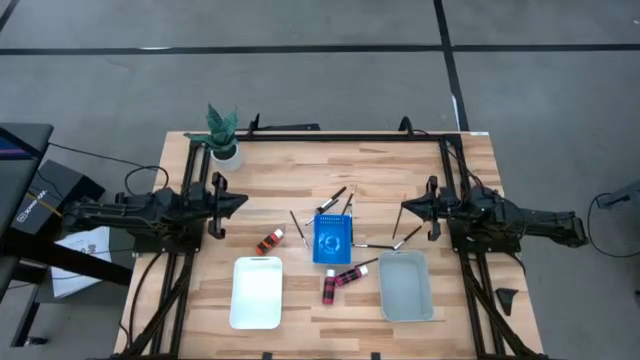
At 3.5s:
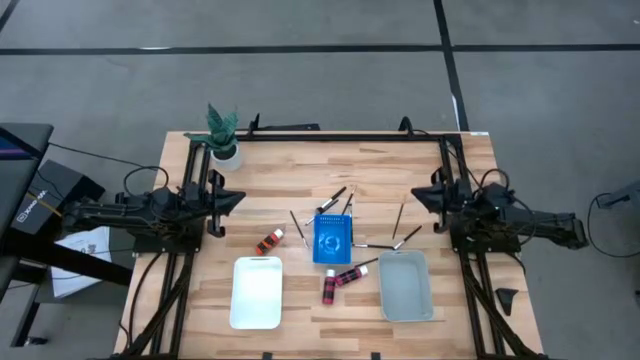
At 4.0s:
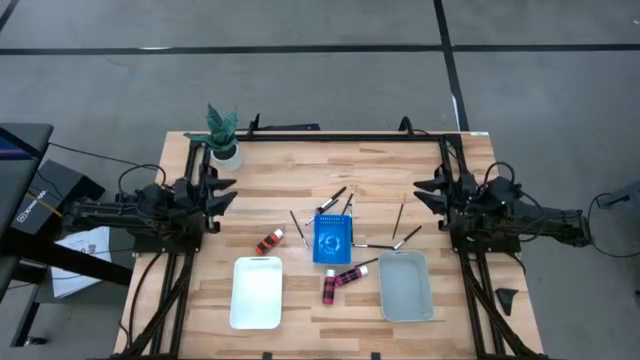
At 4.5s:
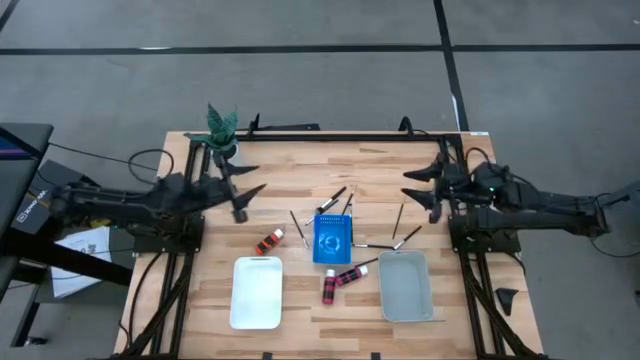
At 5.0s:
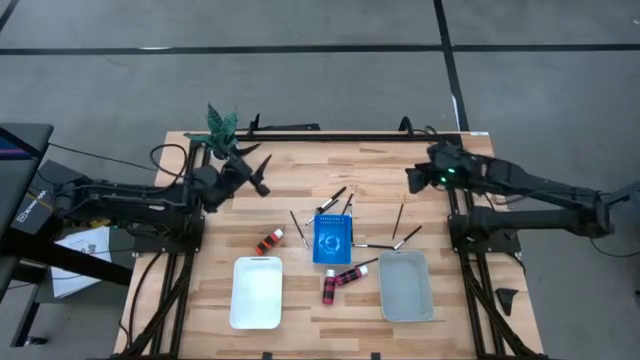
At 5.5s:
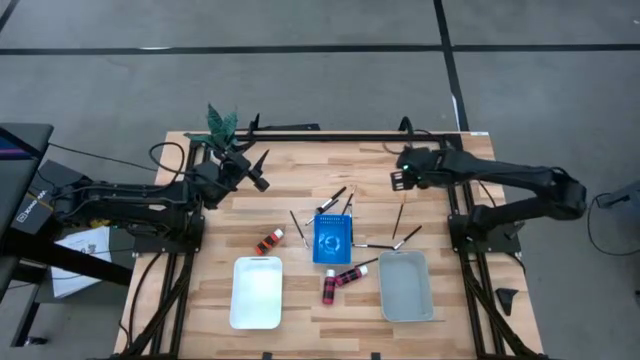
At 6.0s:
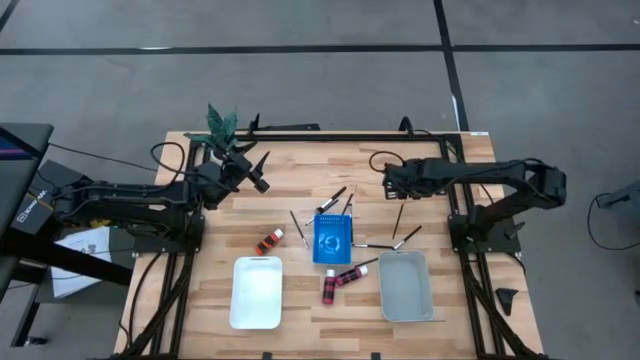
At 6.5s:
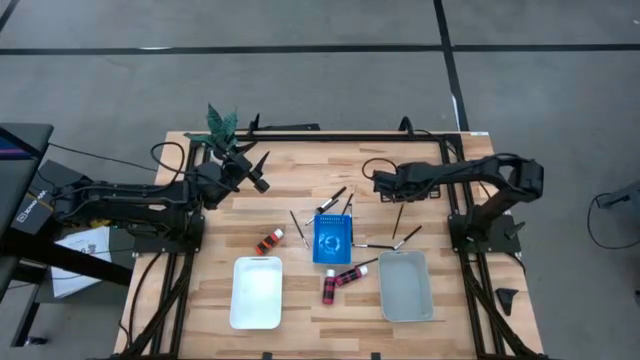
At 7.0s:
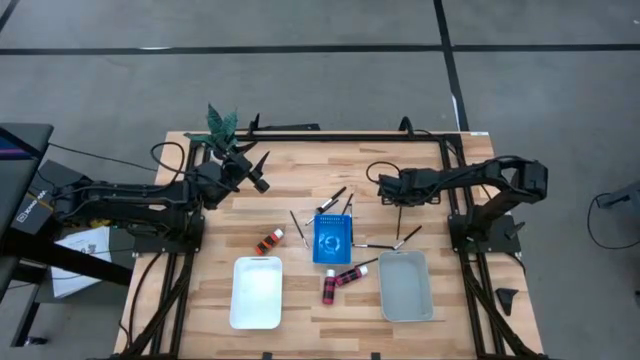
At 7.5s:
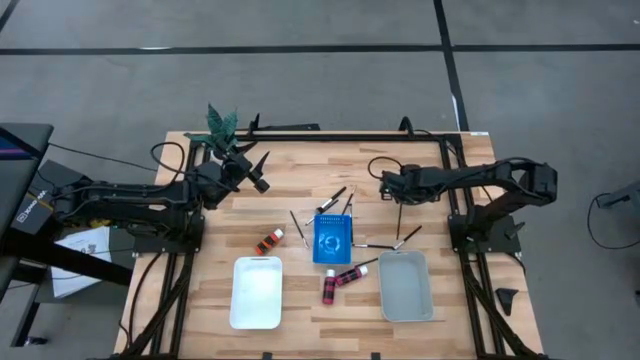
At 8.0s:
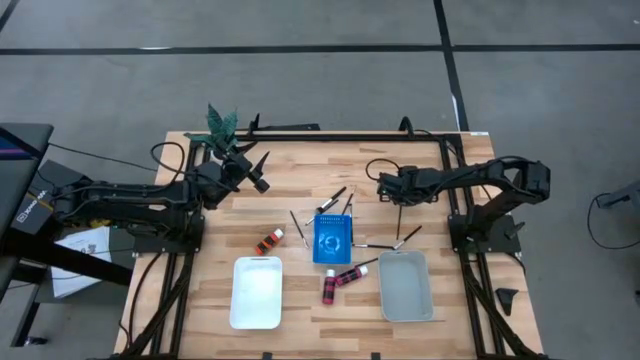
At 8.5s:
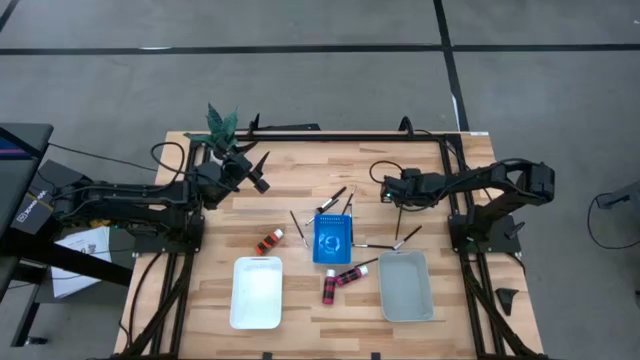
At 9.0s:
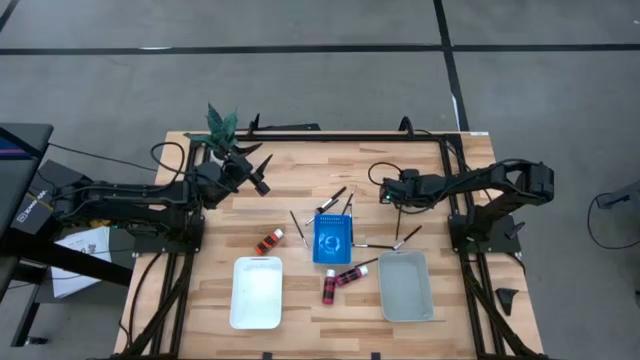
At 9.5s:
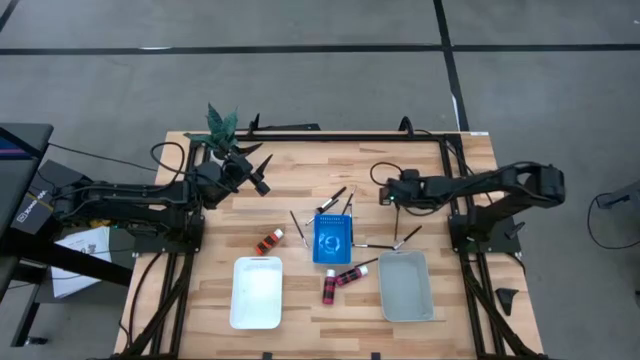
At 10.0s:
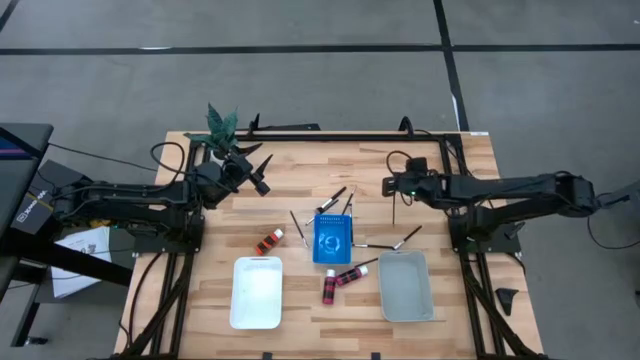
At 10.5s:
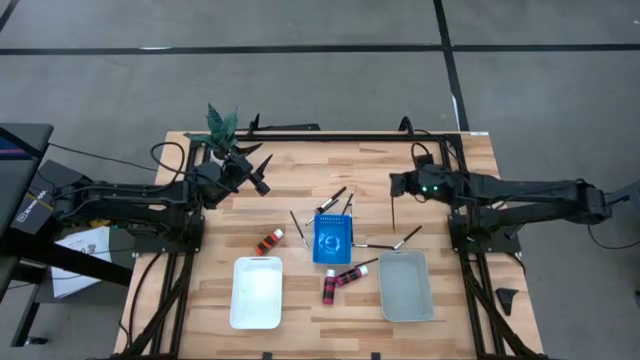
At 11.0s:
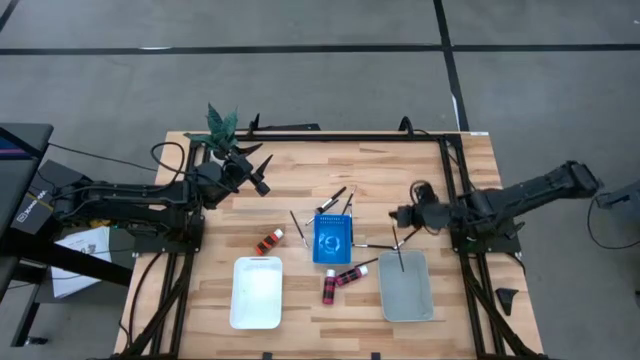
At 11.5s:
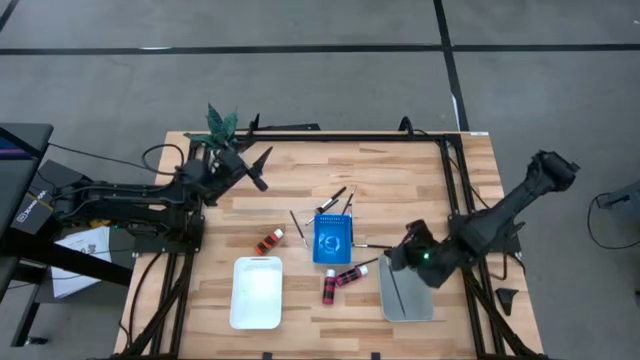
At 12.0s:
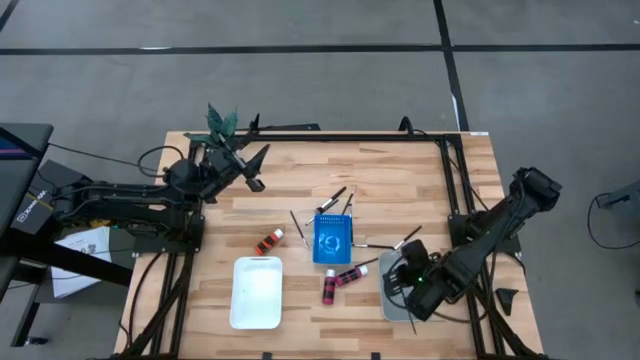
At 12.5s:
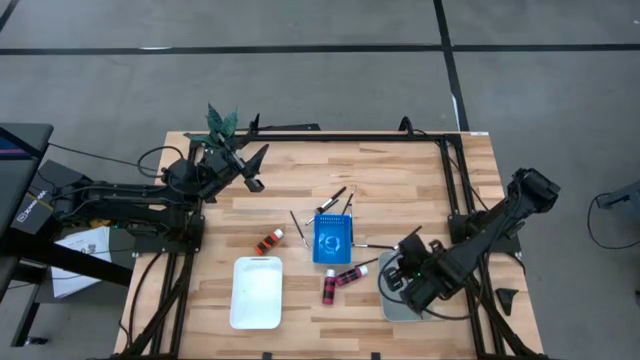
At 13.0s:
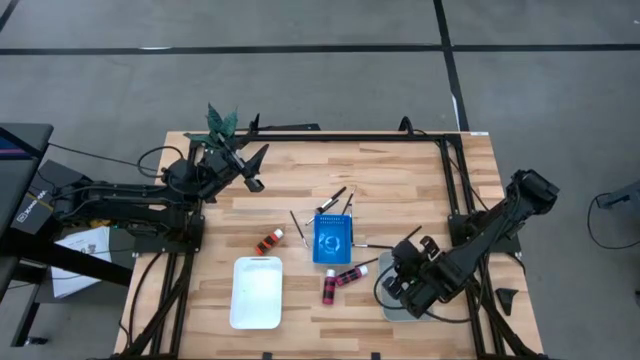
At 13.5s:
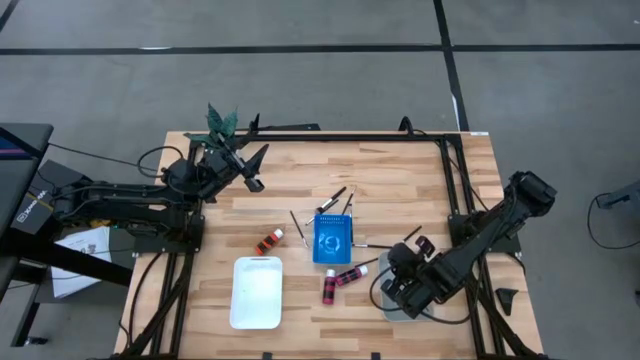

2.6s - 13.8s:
Task: Pick & Place Paint Supplies
Put the paint brush into the gray bin

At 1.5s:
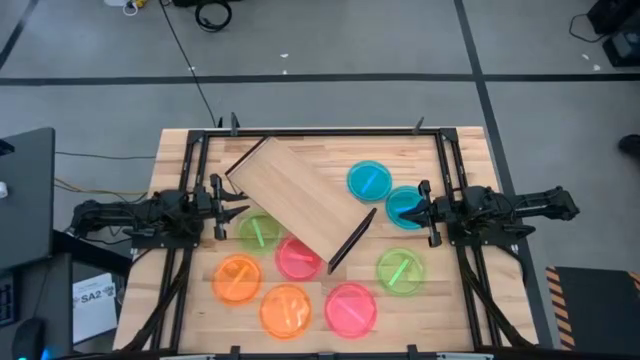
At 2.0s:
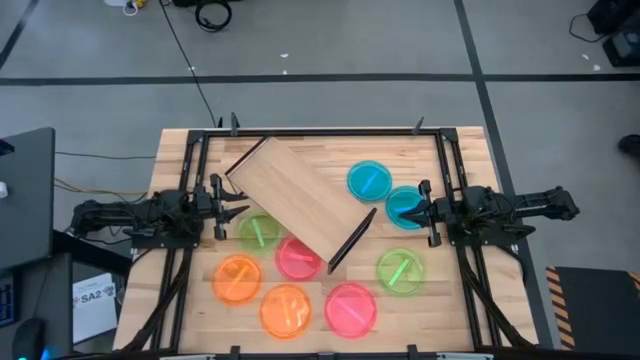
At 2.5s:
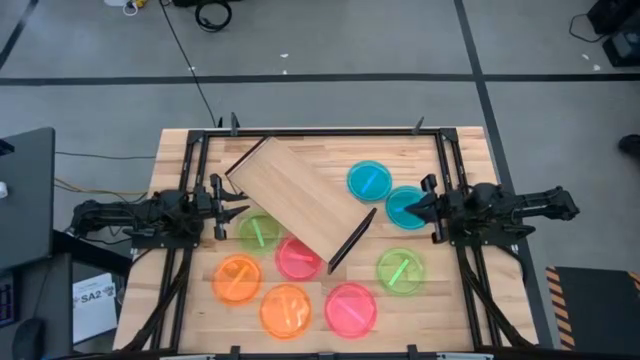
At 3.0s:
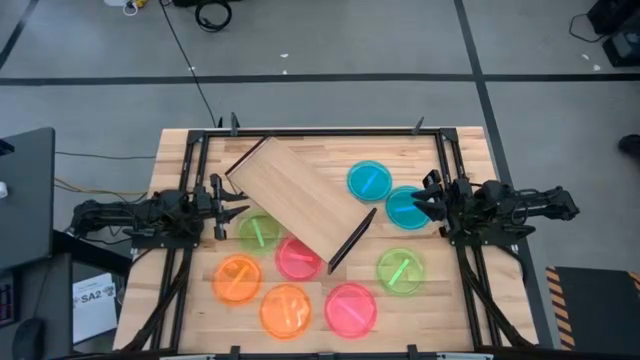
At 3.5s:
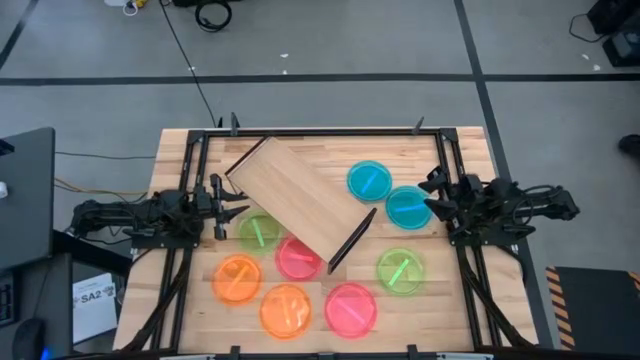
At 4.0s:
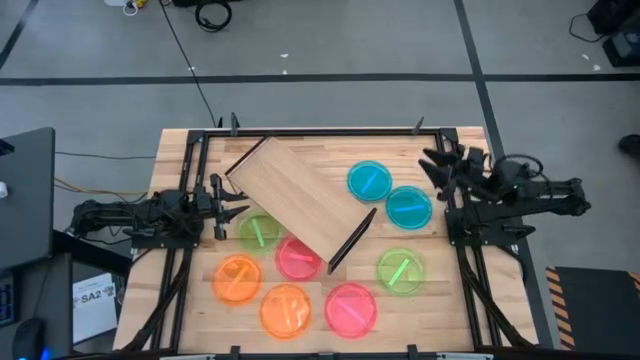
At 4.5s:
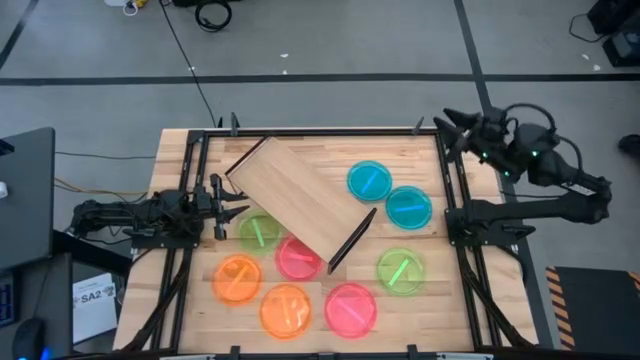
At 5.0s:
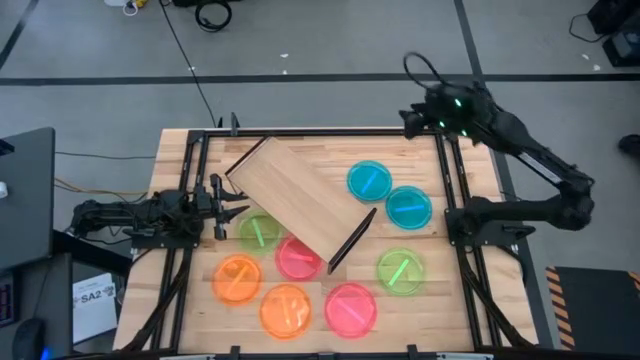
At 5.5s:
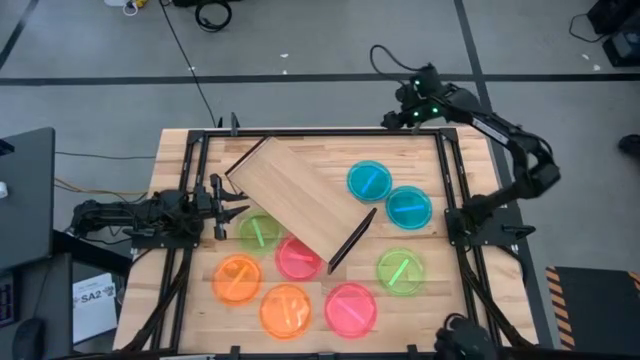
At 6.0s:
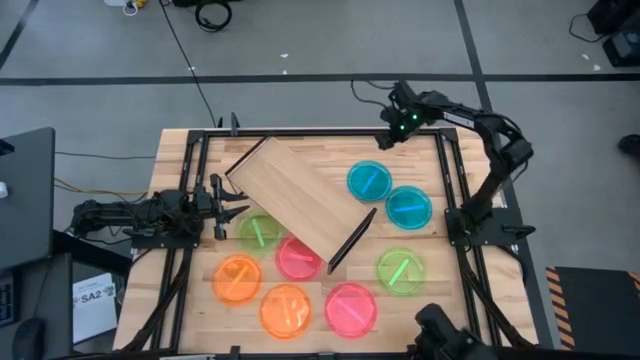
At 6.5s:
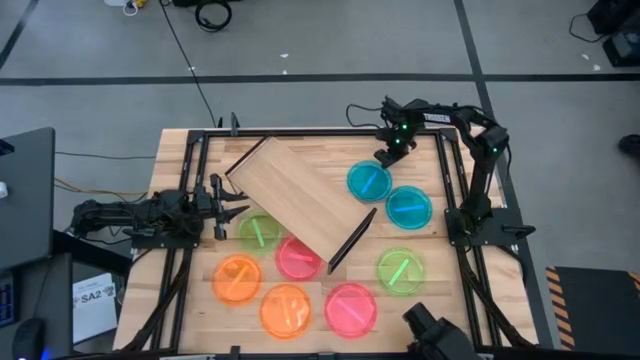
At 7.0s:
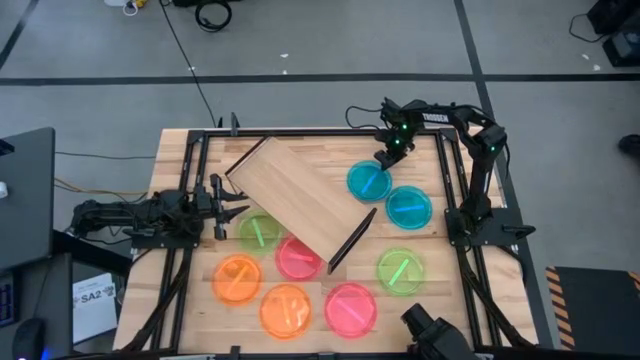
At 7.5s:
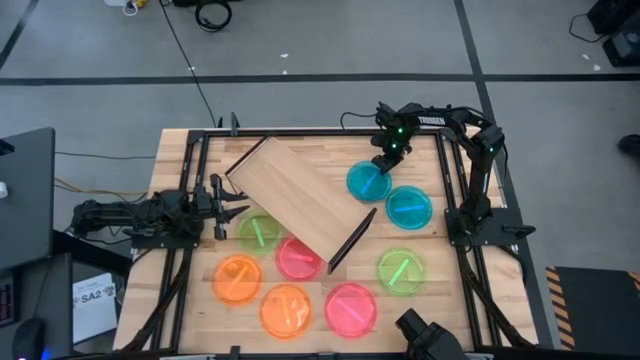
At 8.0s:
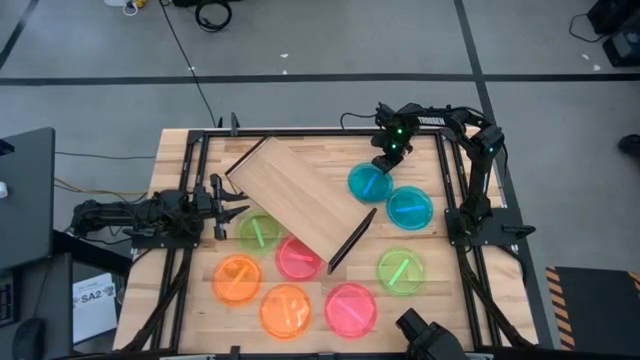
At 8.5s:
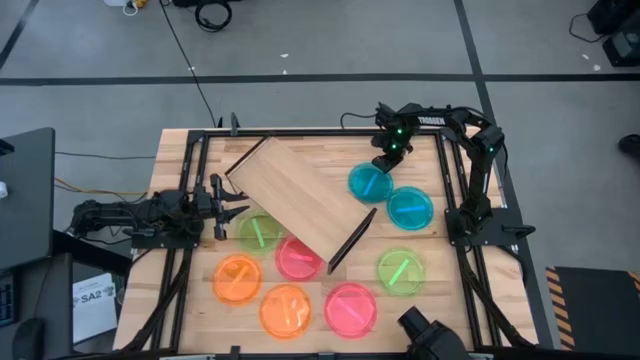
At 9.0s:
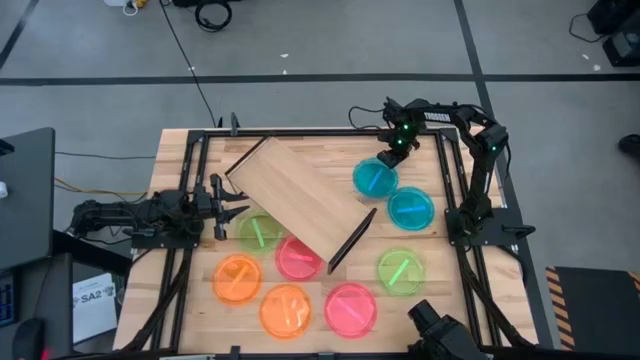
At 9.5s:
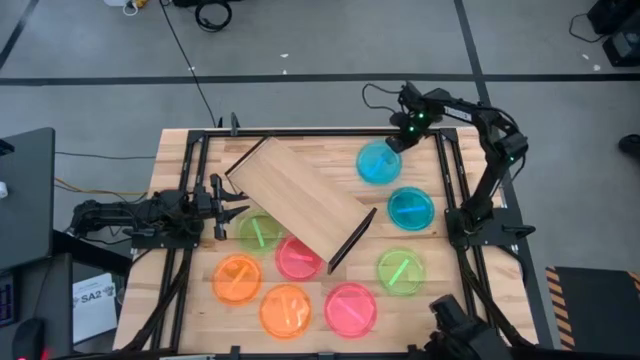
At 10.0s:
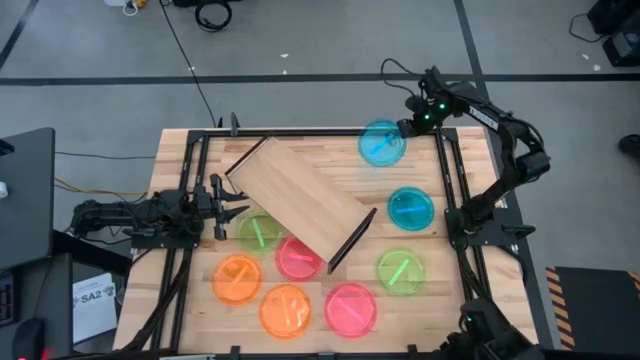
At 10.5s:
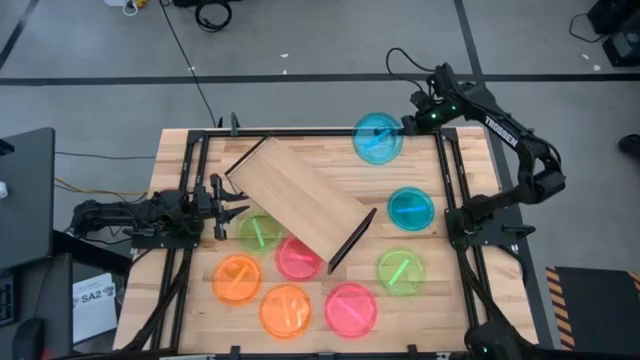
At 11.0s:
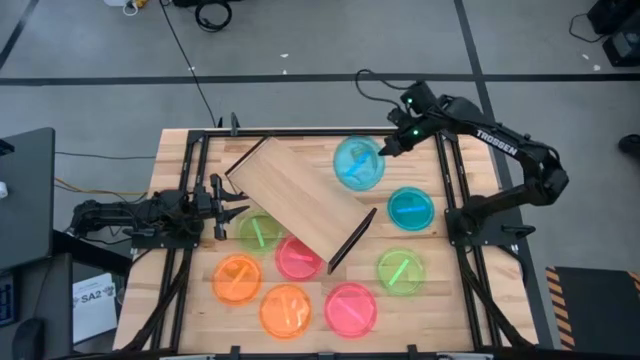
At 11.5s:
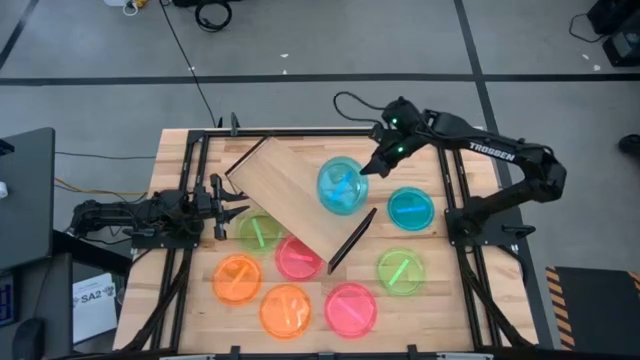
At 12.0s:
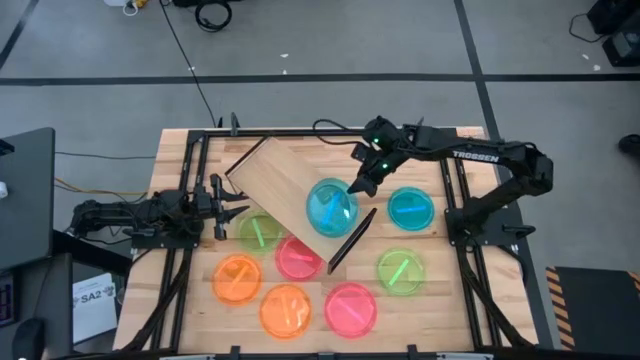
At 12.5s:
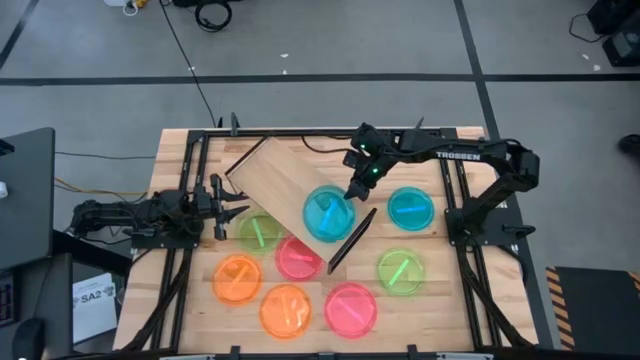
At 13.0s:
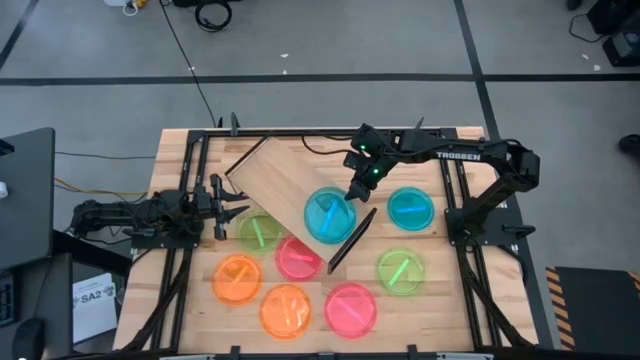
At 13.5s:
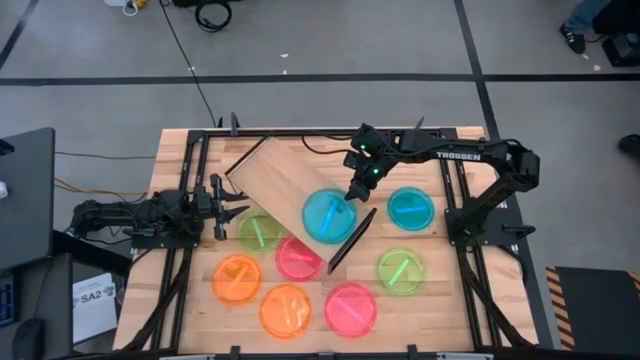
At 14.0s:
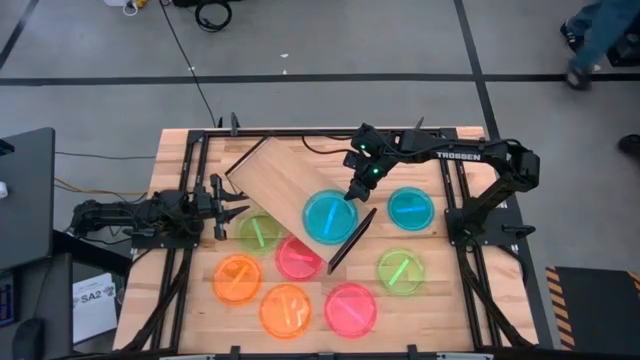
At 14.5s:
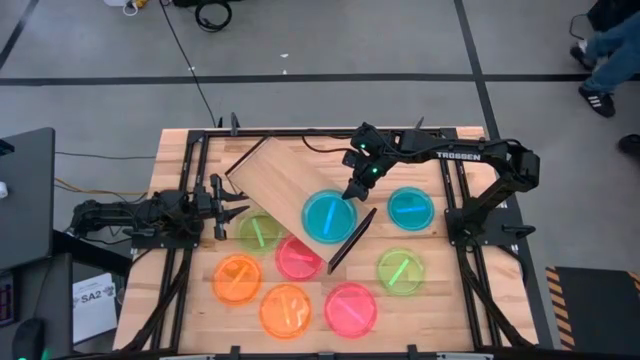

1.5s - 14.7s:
Task: Place and stack plates onto a shelf
Put the top blue plate on the shelf
